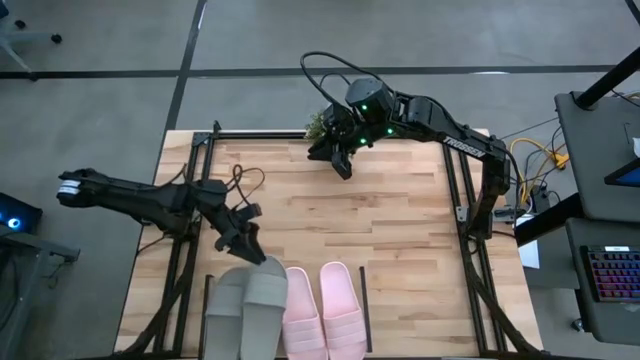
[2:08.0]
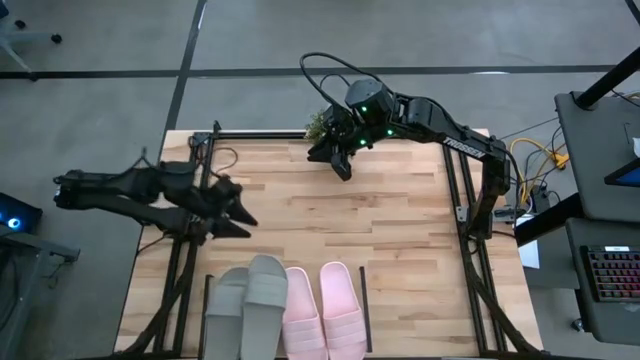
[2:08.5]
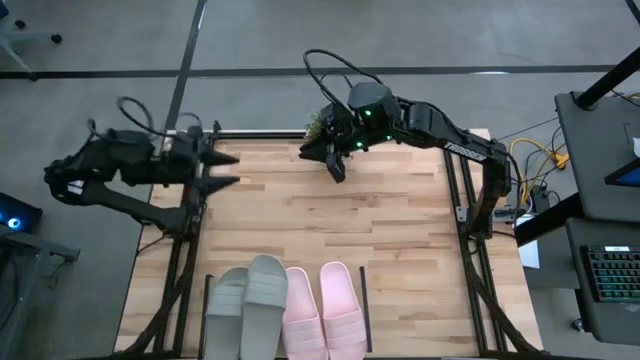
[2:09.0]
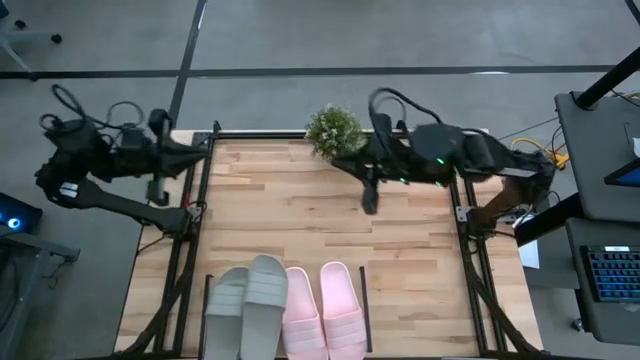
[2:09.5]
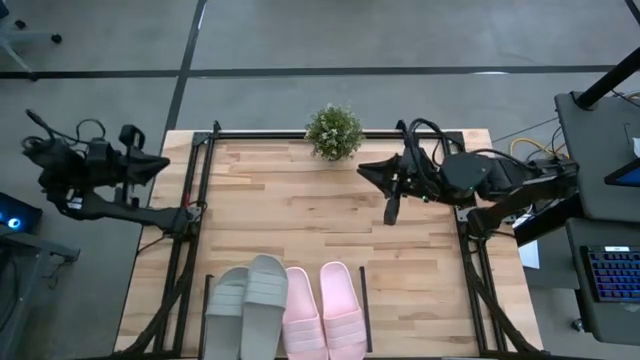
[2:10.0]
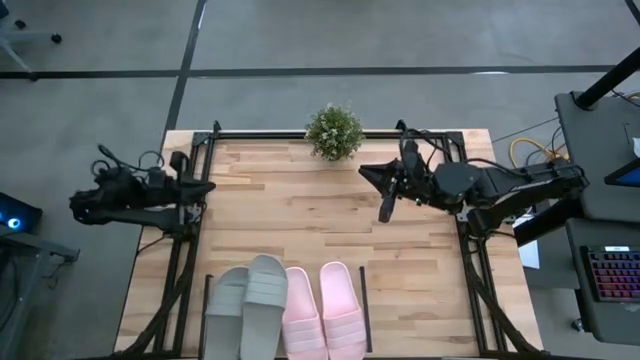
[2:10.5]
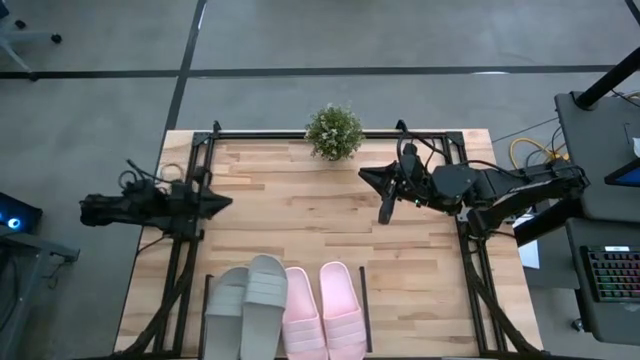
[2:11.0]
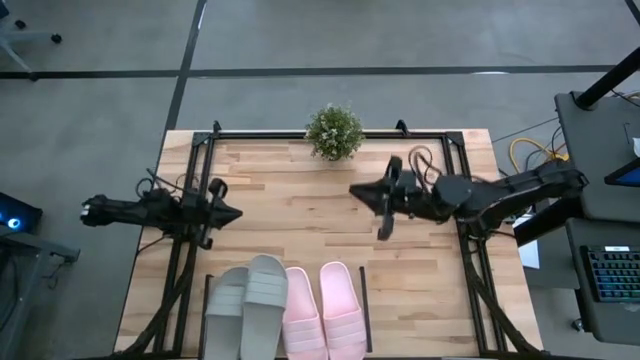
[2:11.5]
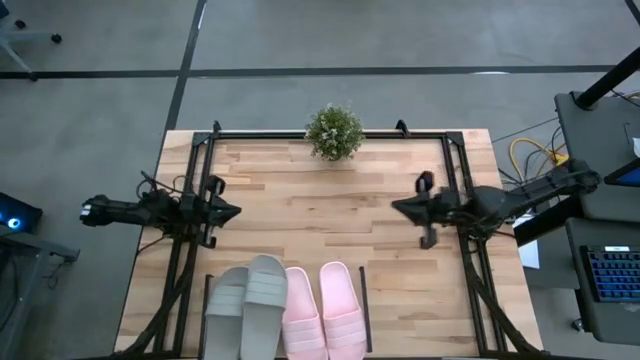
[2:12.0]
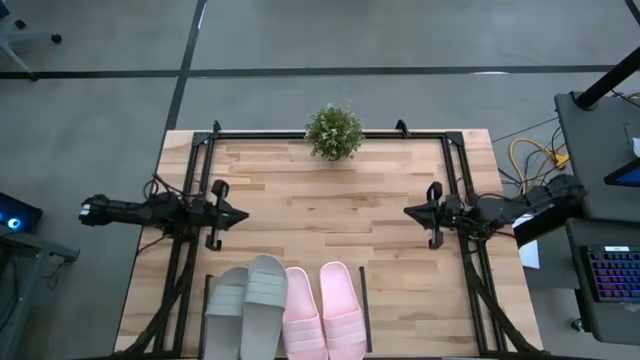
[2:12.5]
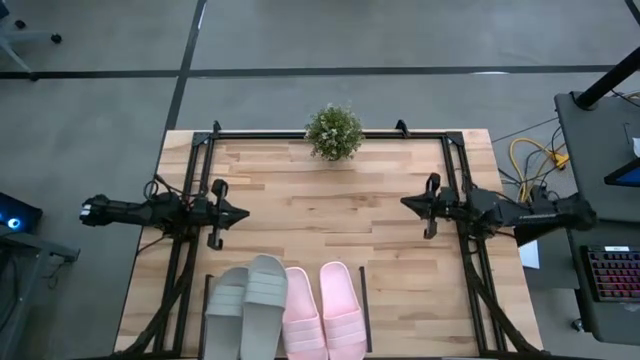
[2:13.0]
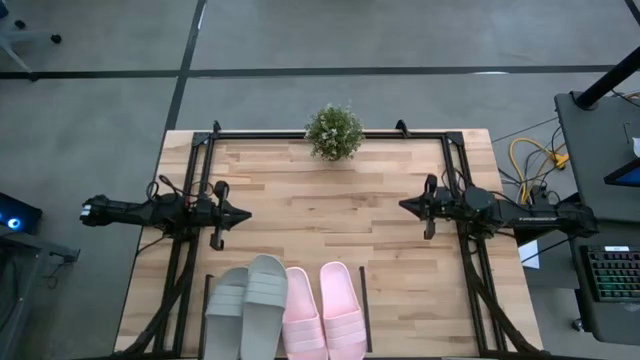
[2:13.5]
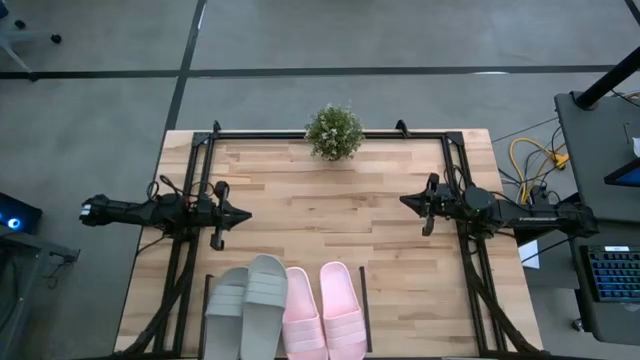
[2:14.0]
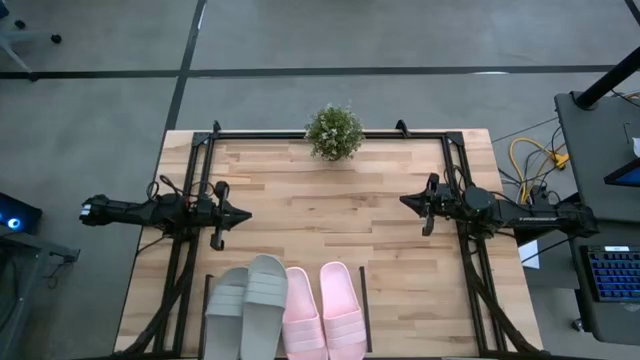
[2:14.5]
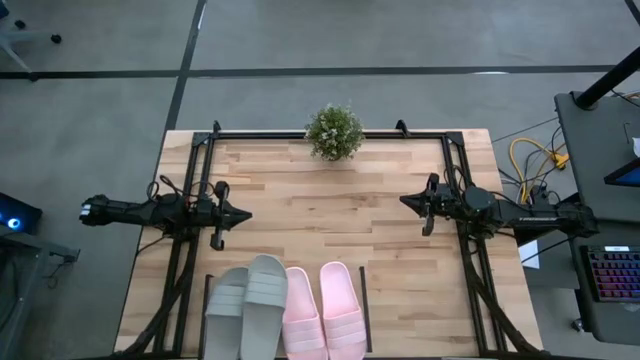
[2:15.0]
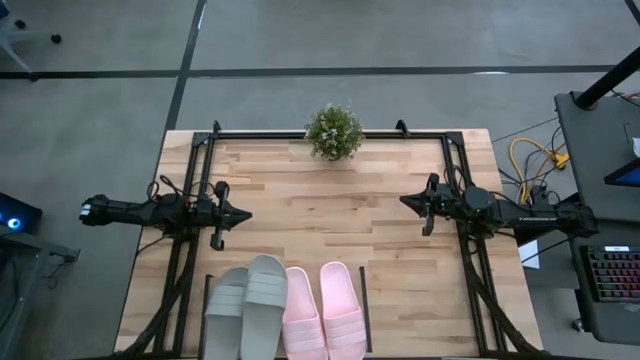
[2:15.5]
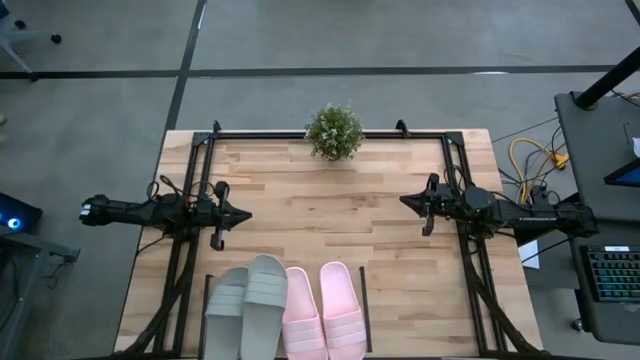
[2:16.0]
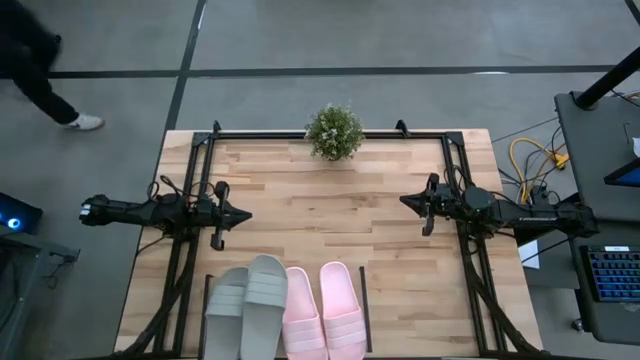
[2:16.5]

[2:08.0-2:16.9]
Task: Pick and place slides into the shelf
Return to Home Position

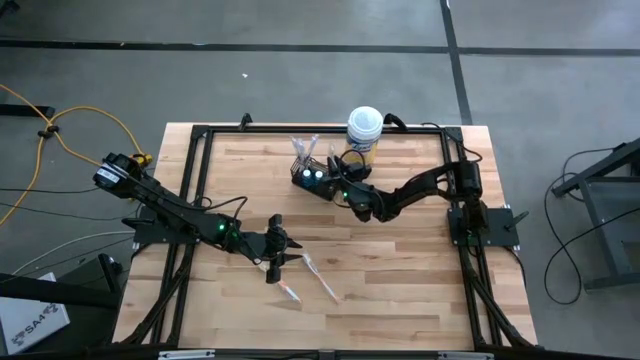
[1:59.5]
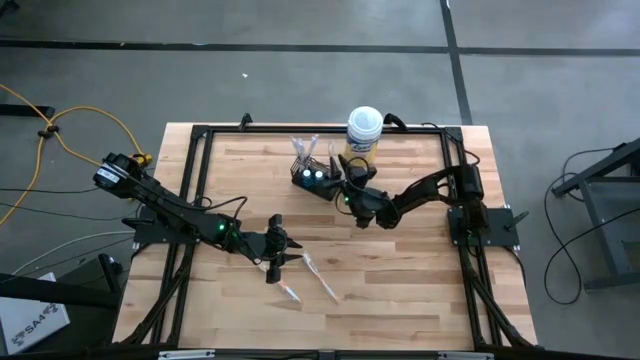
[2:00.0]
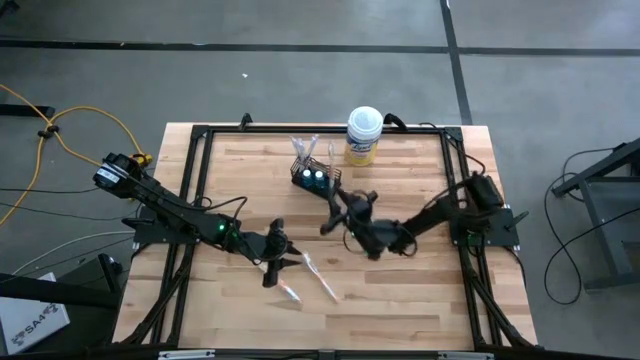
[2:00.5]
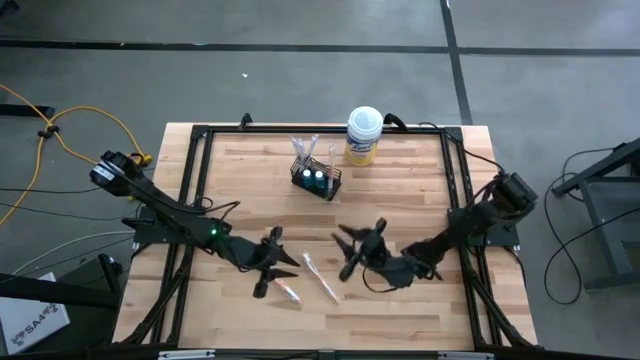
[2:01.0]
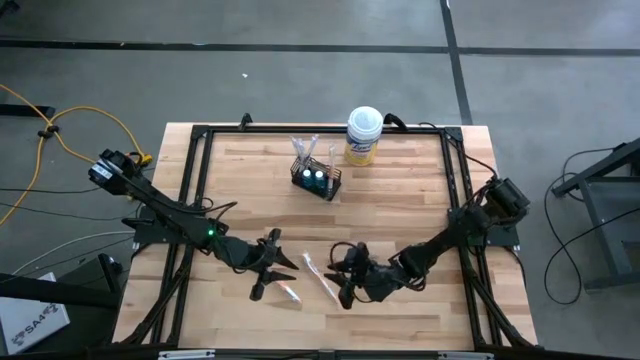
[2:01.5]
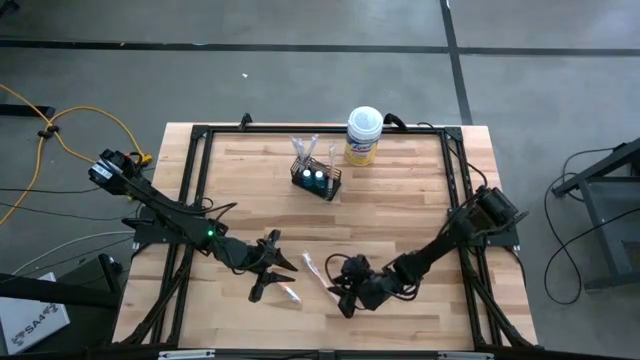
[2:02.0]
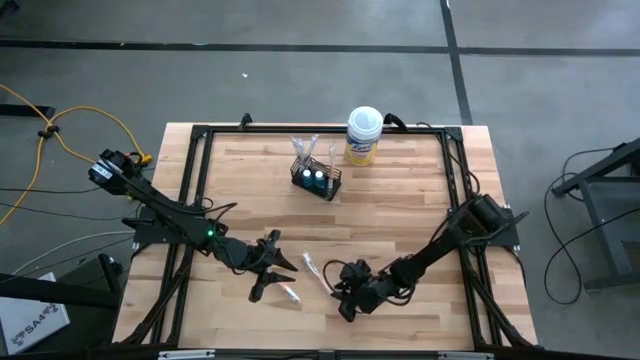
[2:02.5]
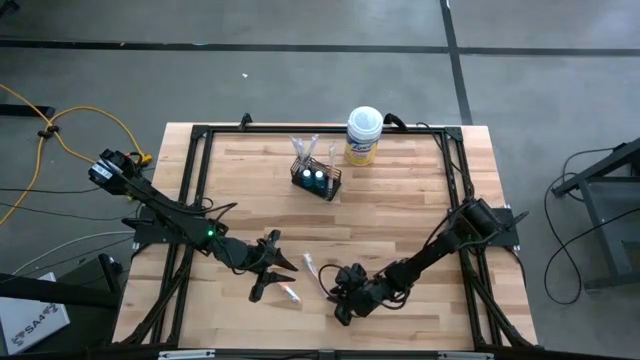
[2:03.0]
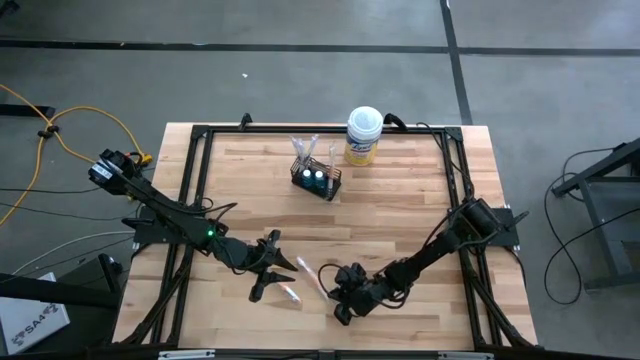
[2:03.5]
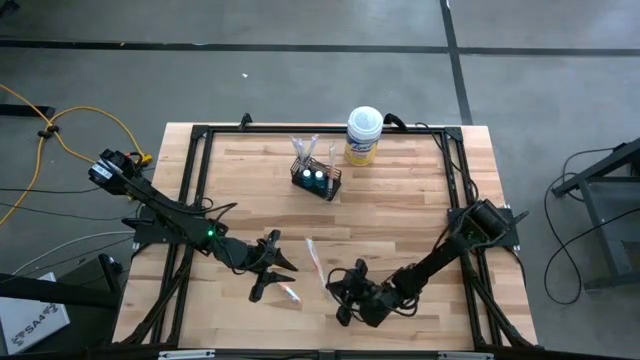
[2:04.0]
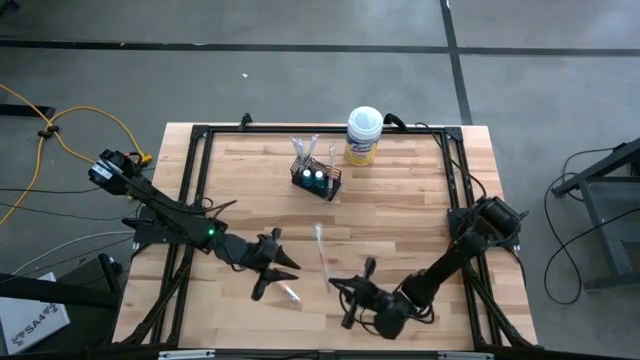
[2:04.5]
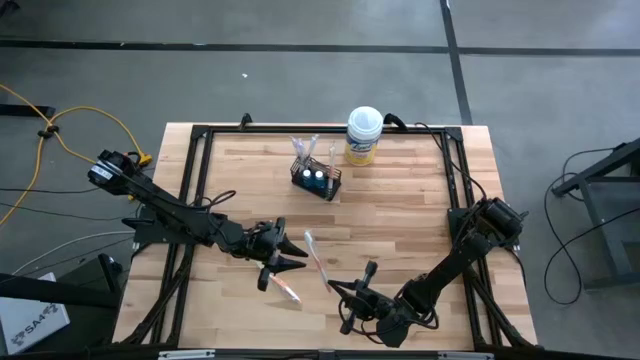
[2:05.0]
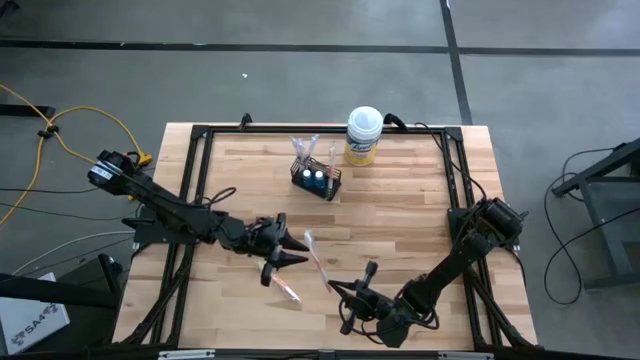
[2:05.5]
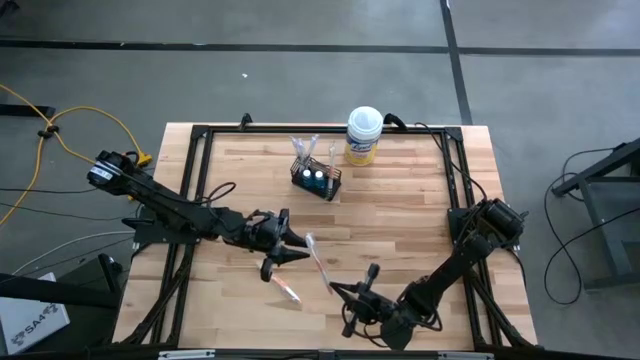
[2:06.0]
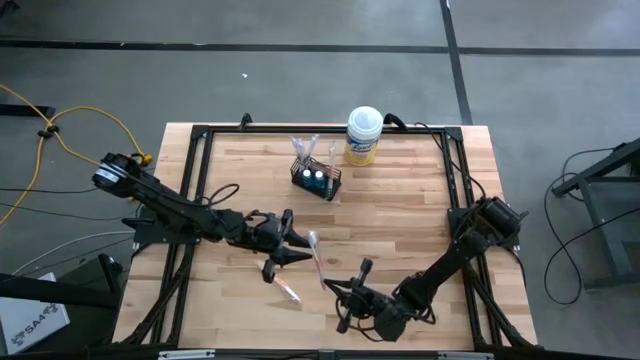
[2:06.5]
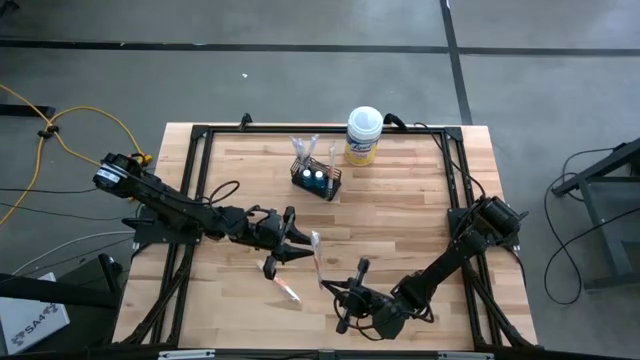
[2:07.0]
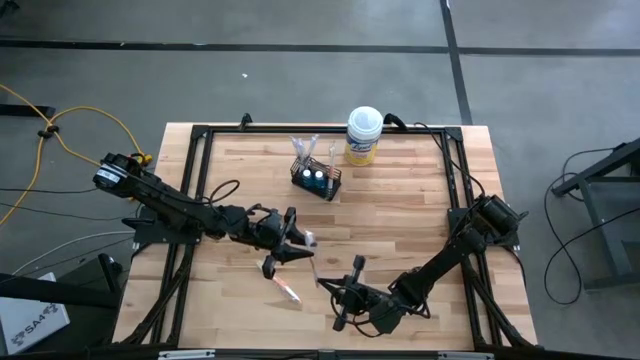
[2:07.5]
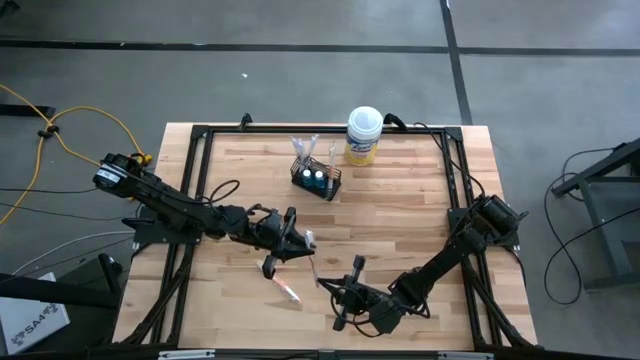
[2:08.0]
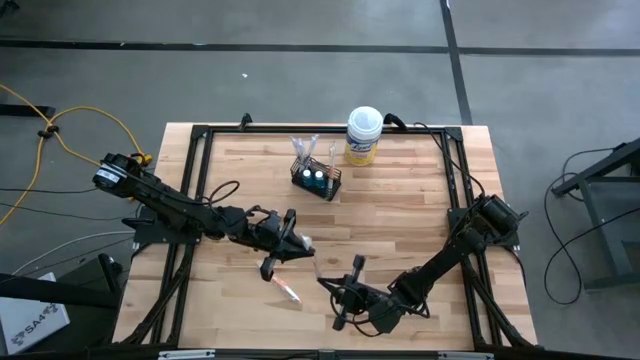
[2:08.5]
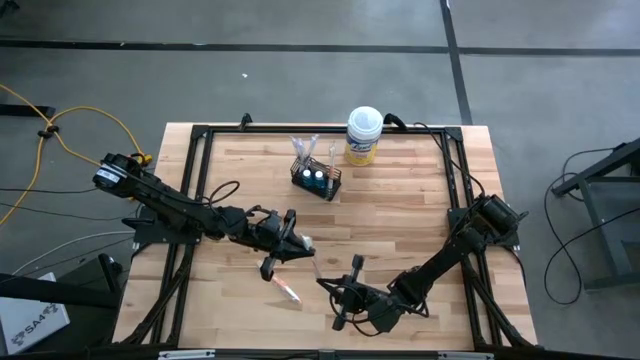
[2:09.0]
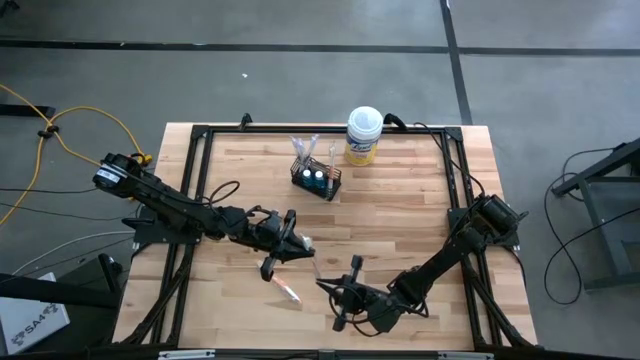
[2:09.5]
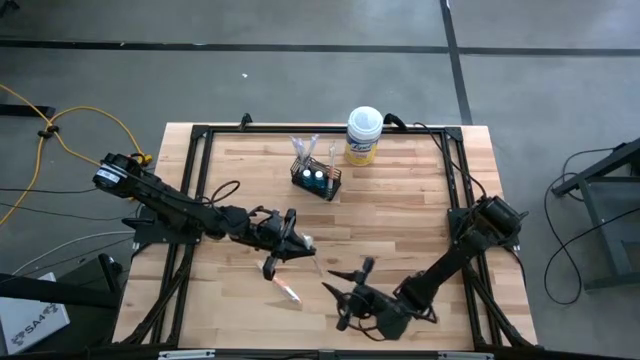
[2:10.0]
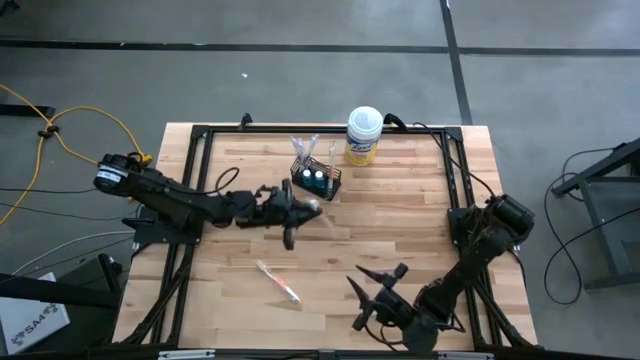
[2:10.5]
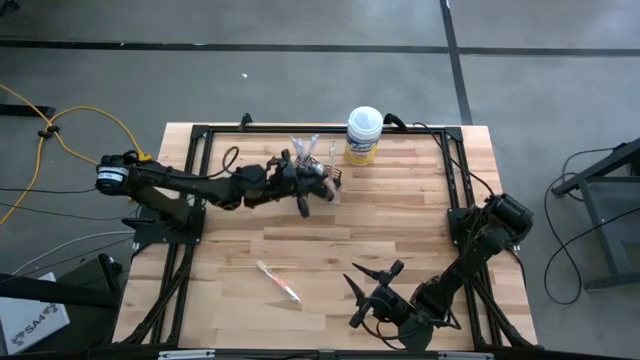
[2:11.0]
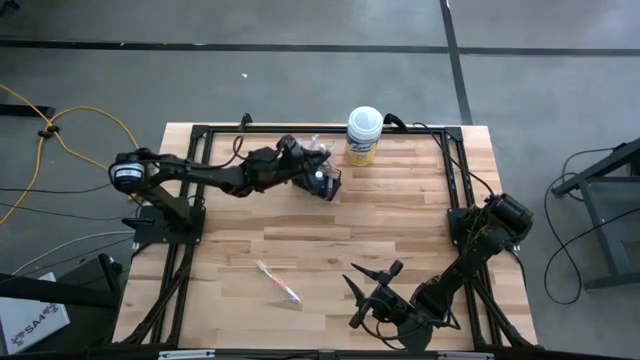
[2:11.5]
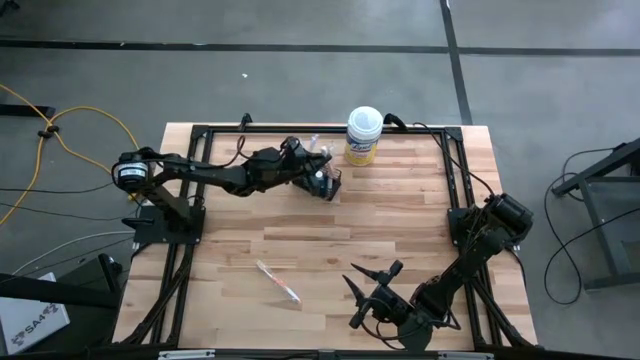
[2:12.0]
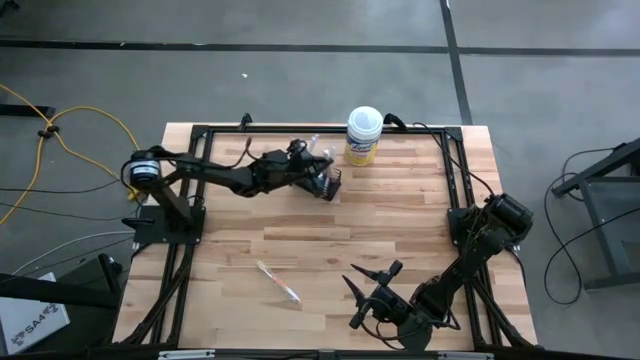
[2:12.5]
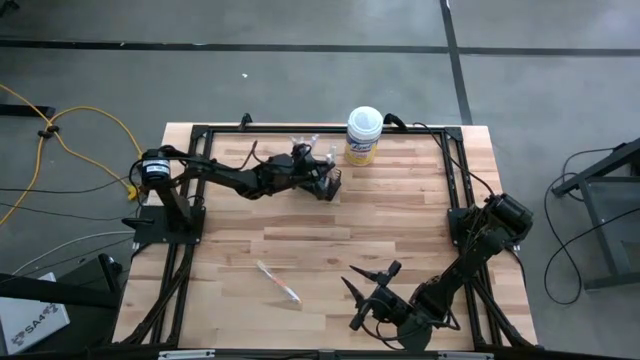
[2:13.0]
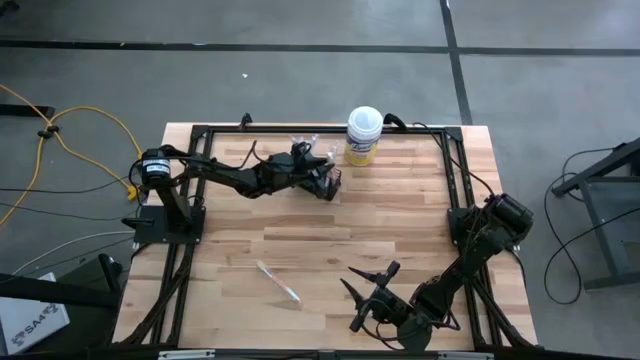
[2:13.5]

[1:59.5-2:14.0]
Task: Pick & Place toothbrushing station
Put the right orange toothbrush into the black mesh organizer
